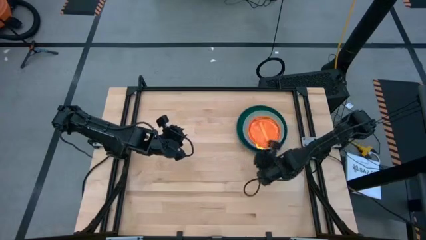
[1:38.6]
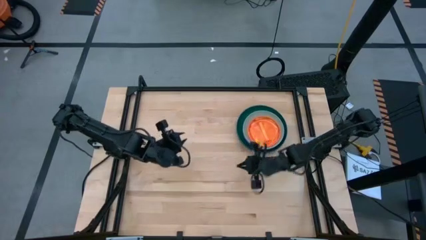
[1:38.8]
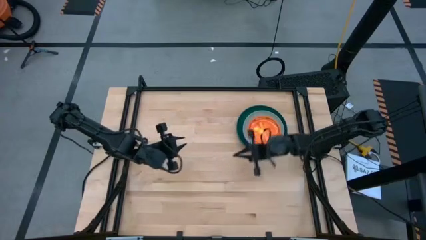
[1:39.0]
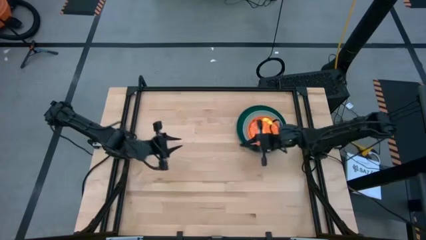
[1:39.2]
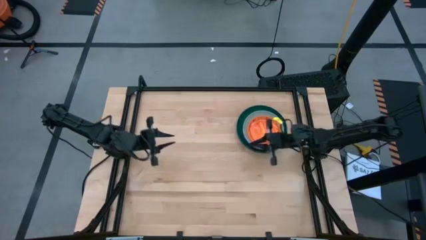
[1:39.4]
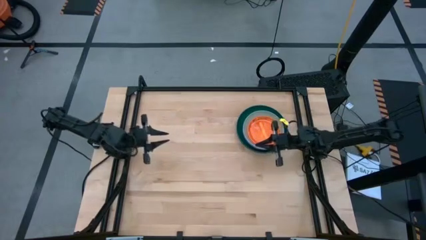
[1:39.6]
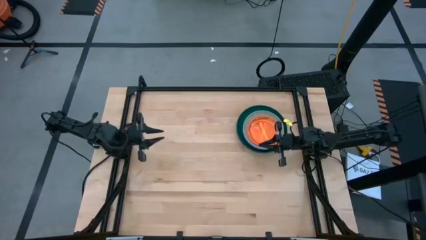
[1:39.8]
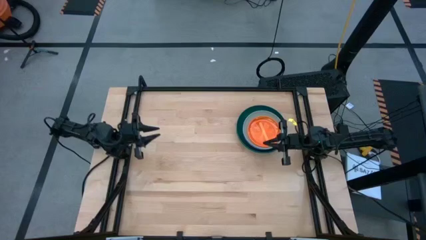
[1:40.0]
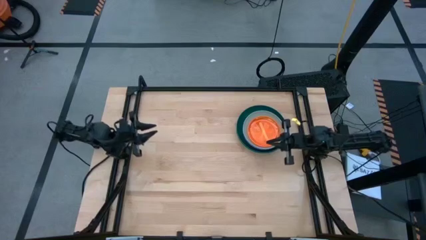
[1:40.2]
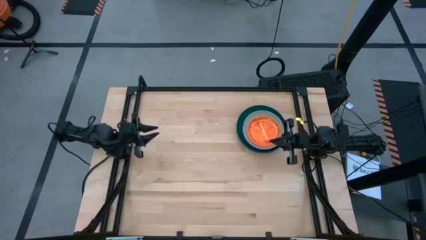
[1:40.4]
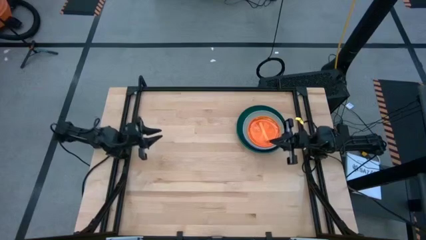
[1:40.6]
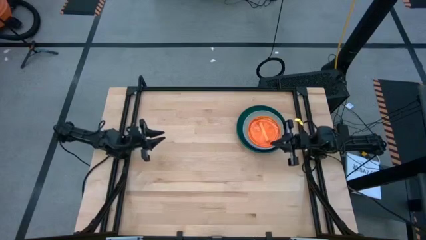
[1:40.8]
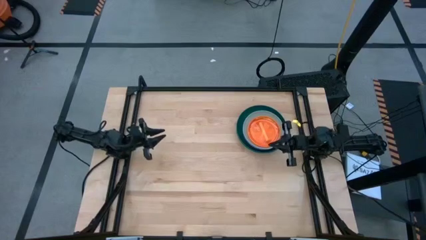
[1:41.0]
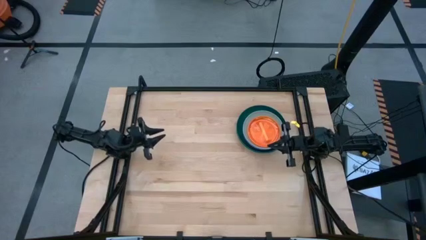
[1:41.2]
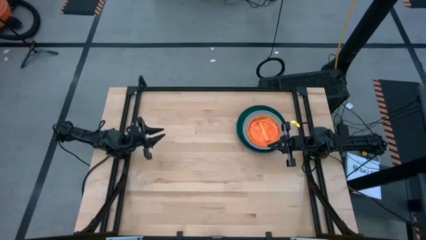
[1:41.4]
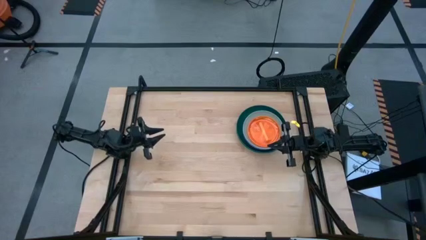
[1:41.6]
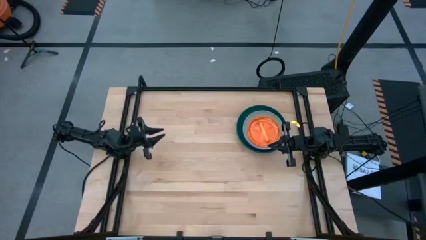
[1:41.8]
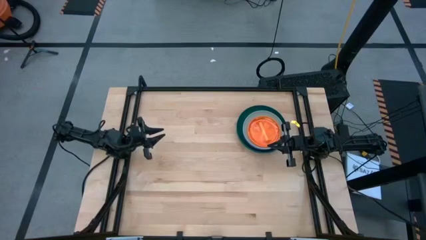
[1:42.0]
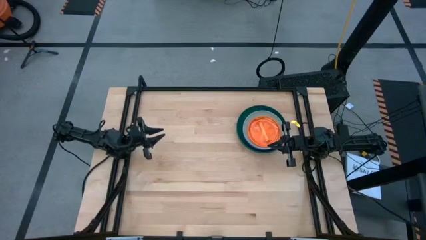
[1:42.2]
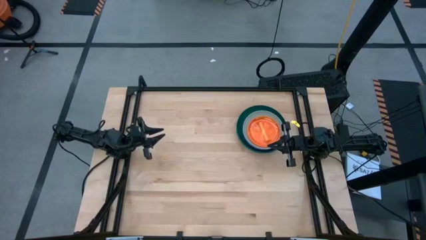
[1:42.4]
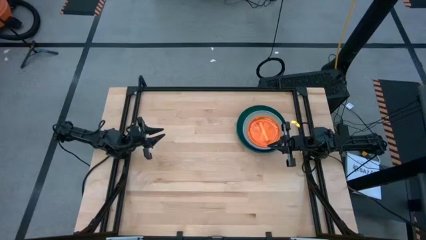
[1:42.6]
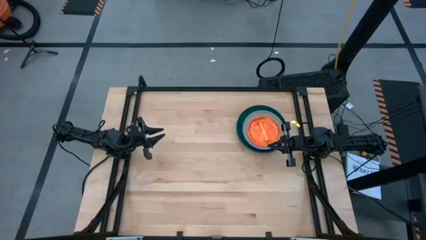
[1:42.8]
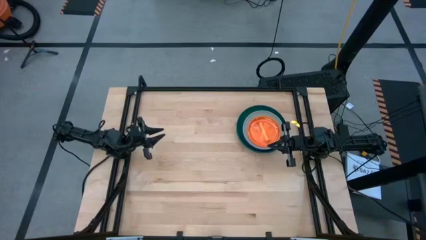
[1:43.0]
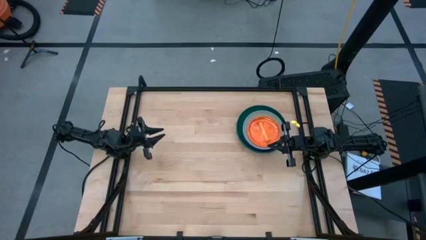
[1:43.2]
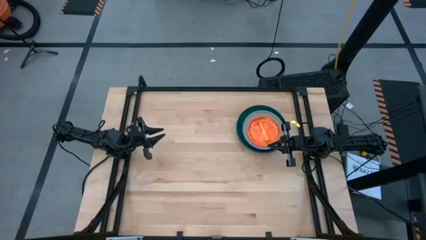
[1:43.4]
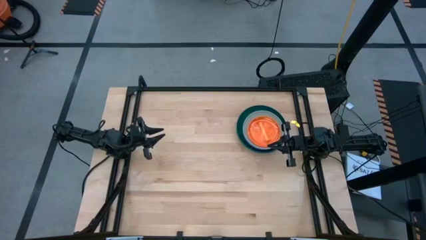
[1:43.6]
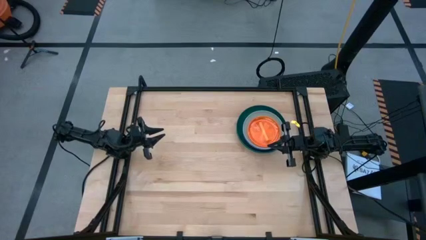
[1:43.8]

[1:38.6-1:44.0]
Task: Stack plastic plates
Return to Home Position

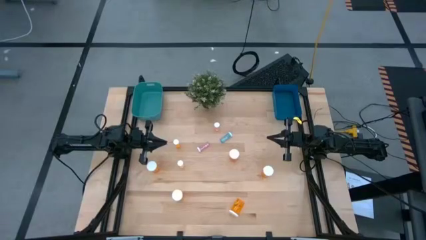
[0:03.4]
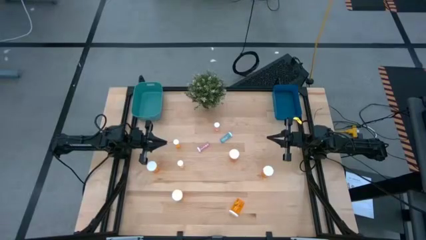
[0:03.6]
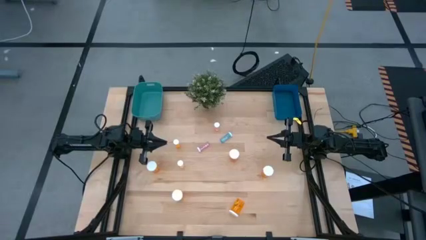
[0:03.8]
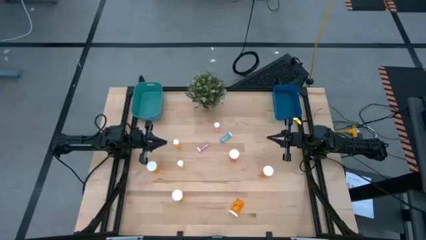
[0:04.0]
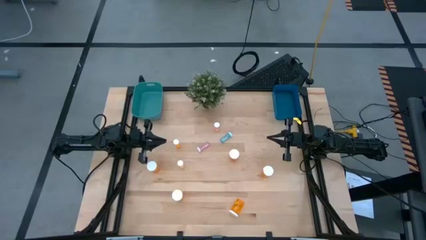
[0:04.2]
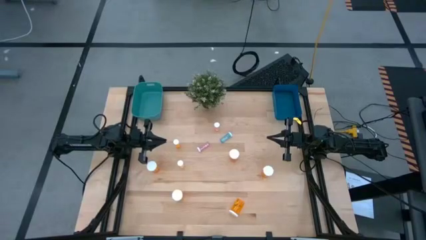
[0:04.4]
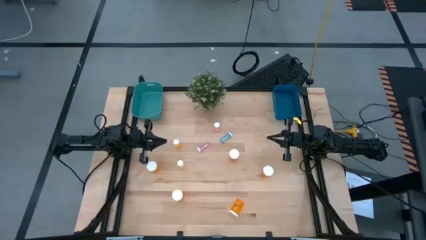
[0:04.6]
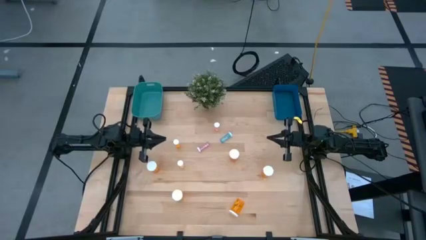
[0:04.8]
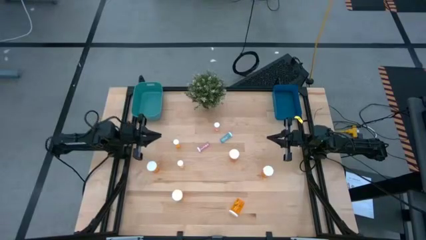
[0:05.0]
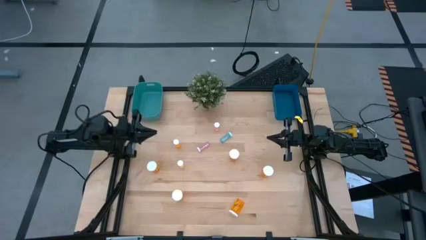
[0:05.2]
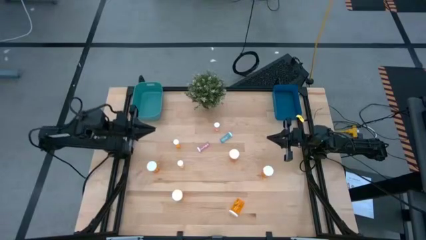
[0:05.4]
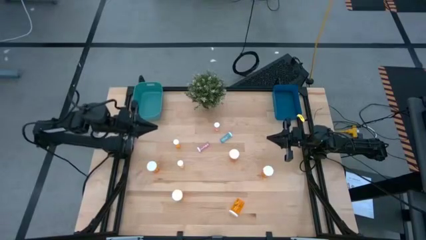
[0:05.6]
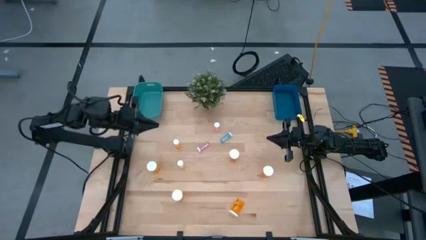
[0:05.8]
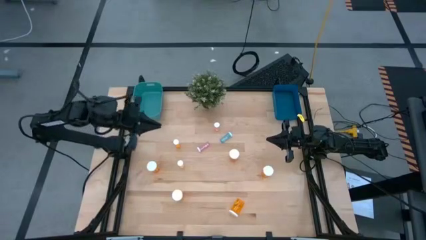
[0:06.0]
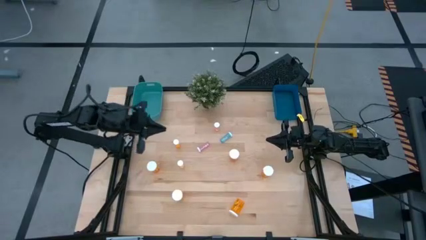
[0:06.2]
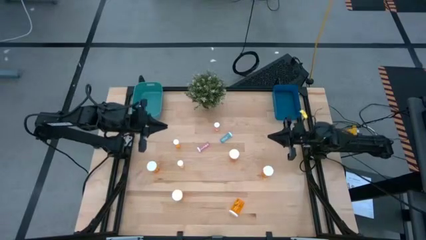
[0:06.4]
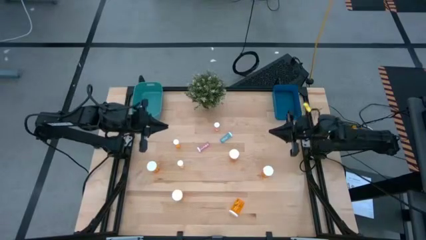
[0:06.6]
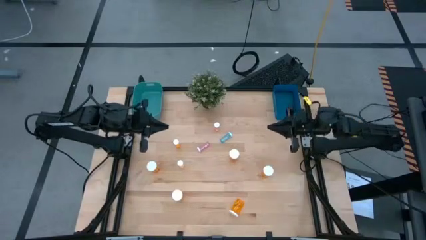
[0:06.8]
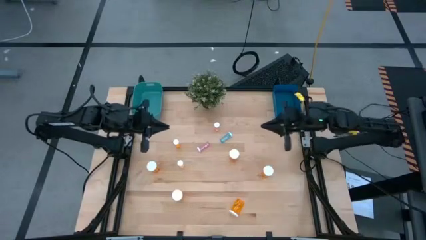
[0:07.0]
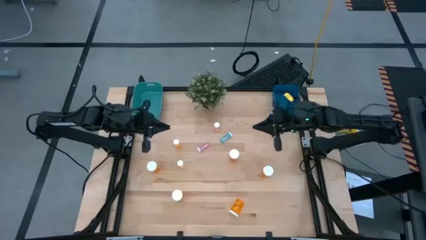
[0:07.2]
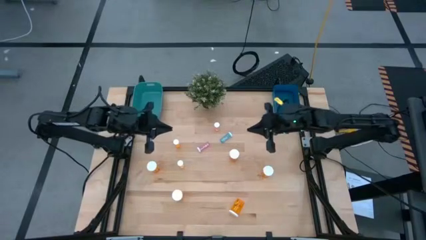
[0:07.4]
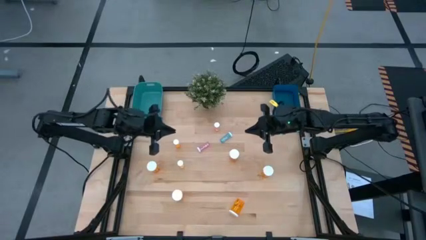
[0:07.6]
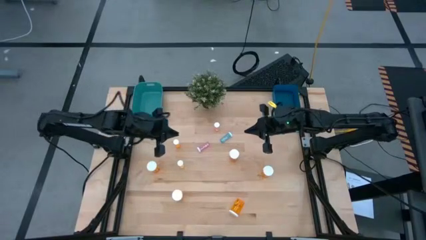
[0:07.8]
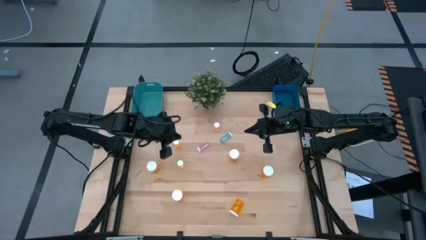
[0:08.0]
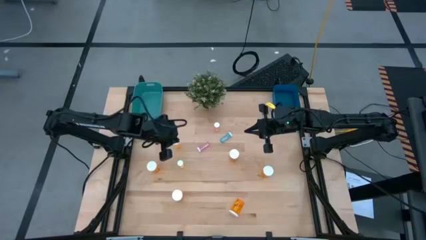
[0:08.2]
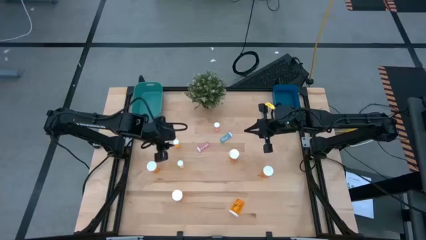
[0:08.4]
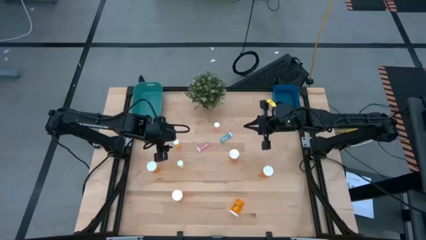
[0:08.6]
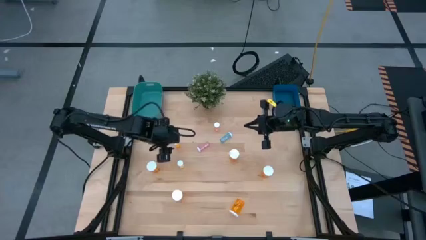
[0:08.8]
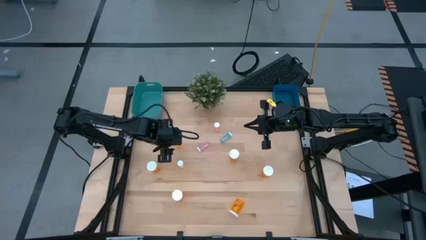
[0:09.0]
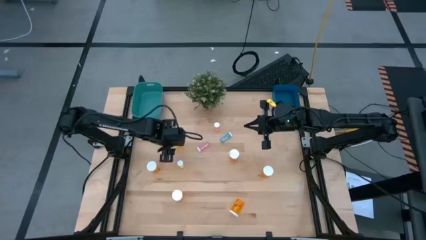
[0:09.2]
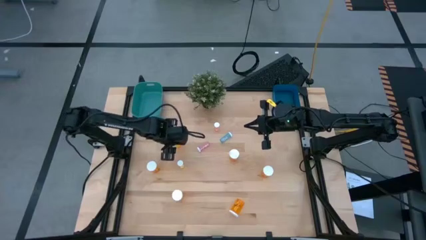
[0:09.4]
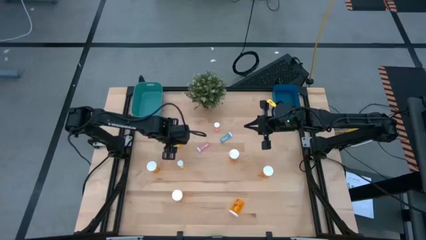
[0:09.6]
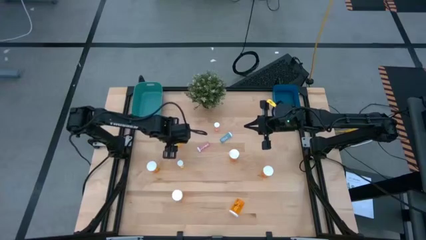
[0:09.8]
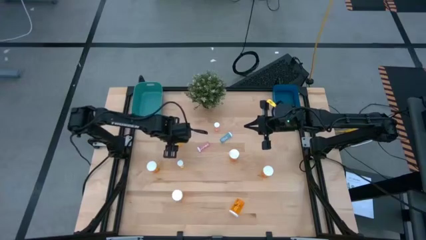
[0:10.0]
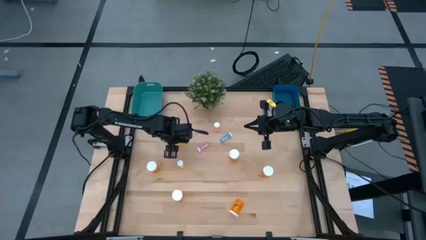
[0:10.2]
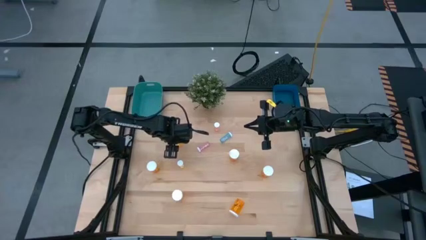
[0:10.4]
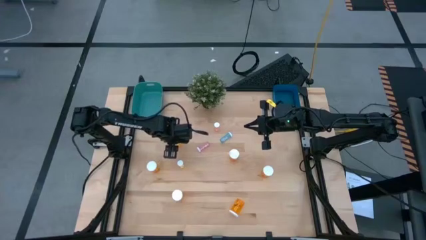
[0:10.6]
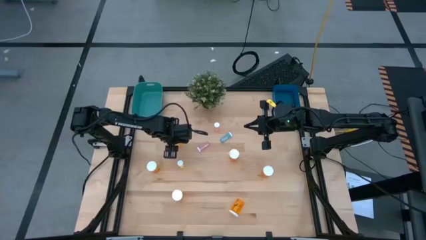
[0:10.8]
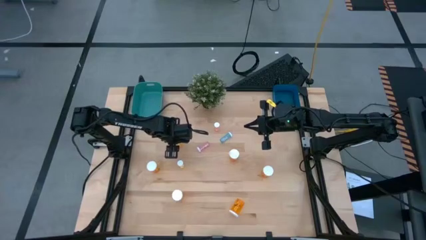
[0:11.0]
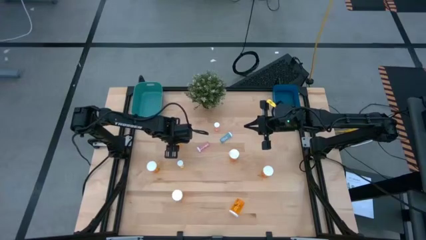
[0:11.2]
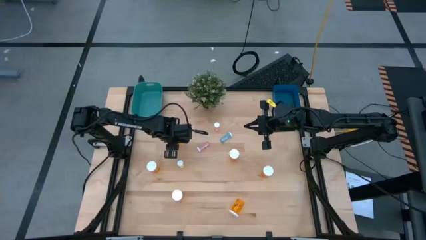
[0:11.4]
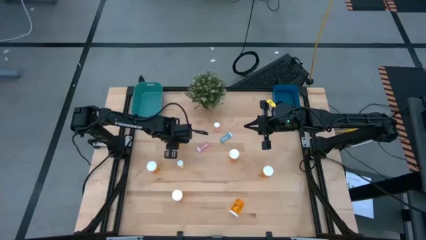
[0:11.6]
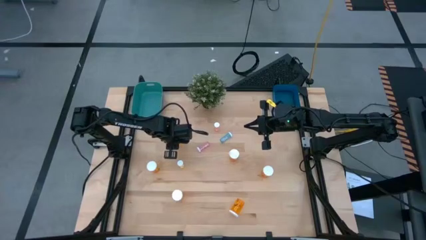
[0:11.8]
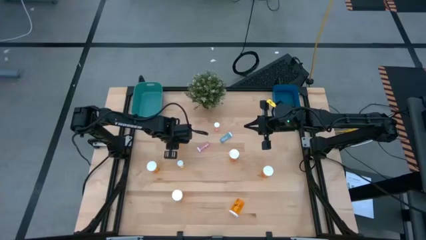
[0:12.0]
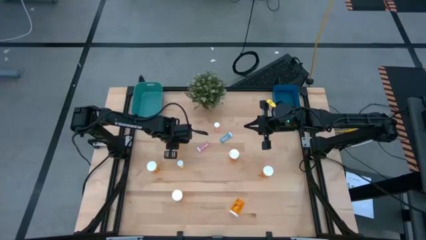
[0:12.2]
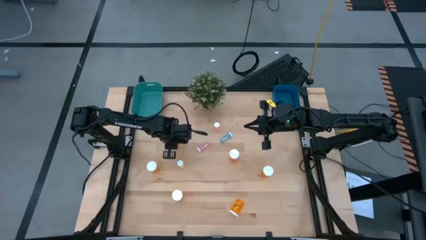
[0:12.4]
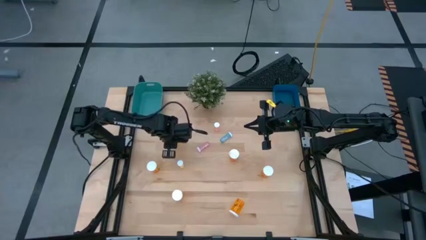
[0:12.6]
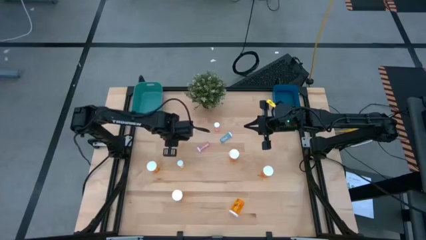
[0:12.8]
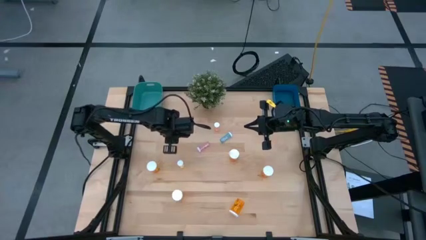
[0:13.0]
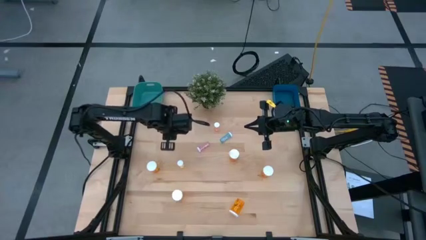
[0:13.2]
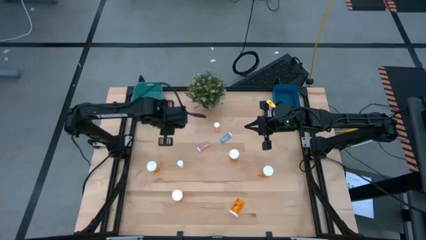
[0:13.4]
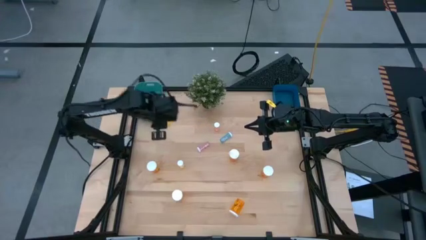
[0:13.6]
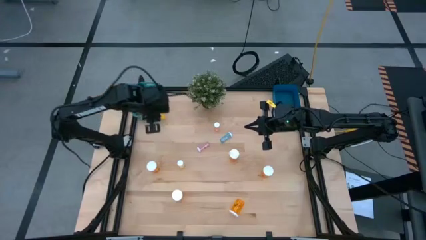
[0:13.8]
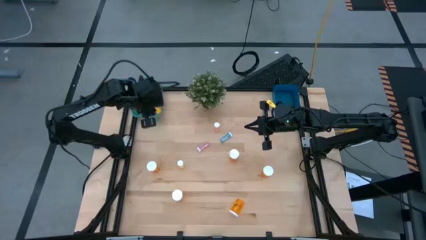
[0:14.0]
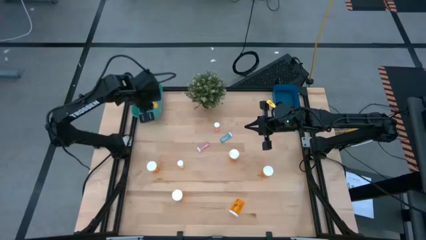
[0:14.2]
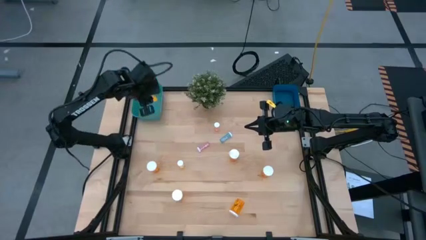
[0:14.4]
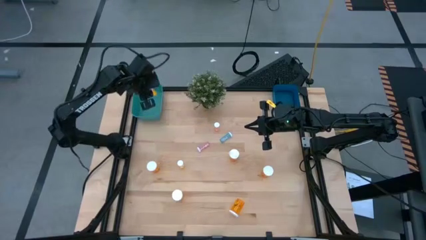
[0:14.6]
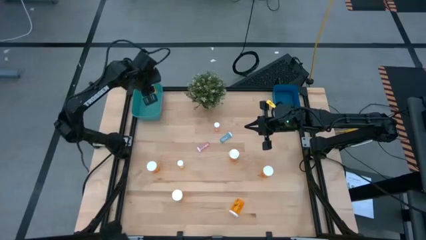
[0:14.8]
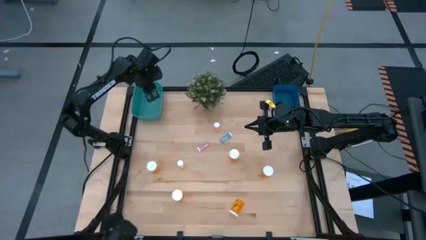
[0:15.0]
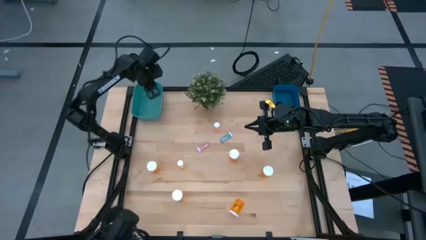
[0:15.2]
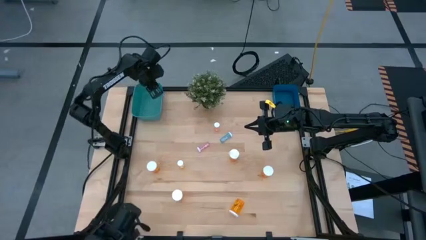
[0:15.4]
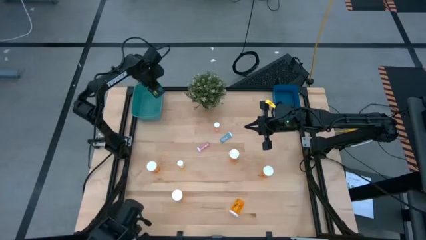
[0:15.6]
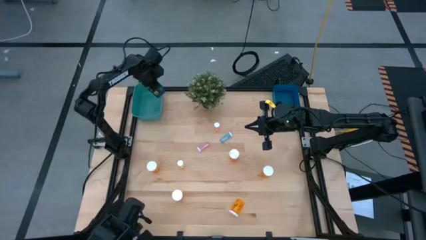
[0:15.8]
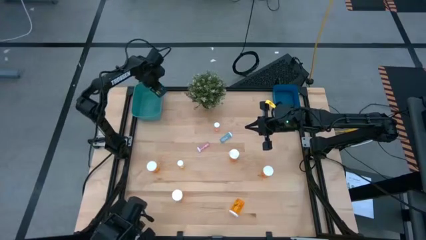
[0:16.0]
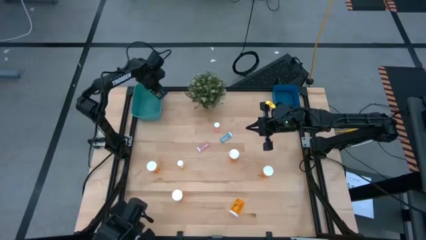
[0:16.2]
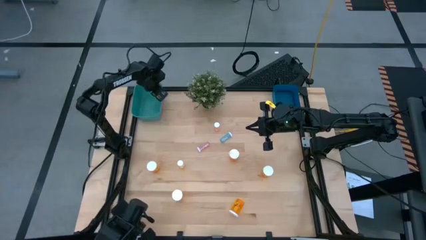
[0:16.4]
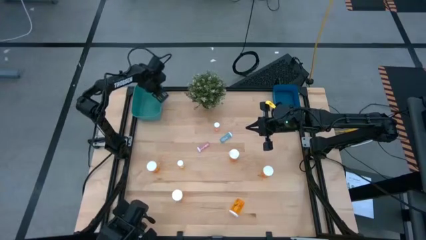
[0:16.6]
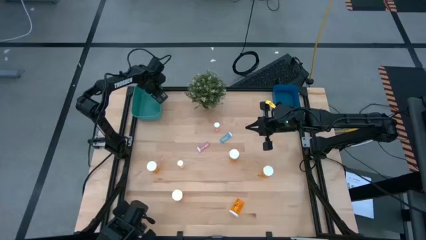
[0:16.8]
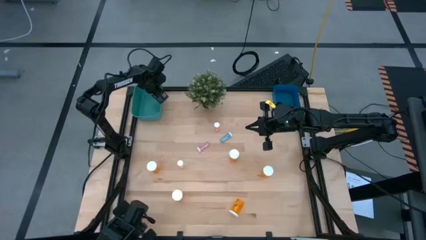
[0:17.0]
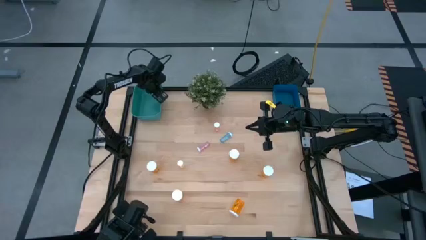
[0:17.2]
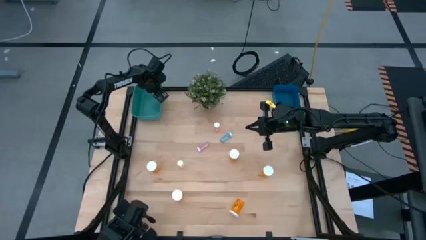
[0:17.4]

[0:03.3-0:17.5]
Task: Pick and place medicine bottles into bin by pill shape (circle, oval)
Put the small orange pill bottle into the green bin
